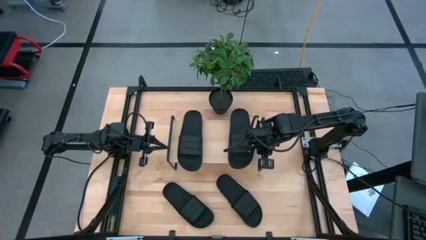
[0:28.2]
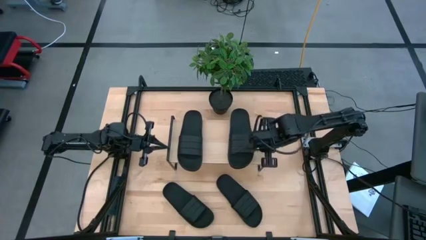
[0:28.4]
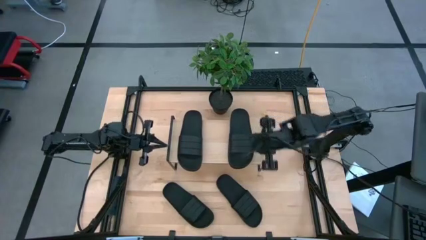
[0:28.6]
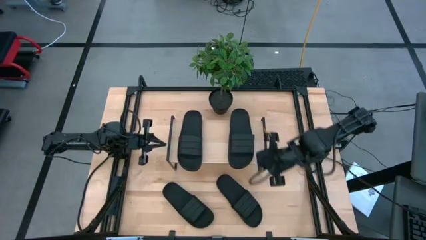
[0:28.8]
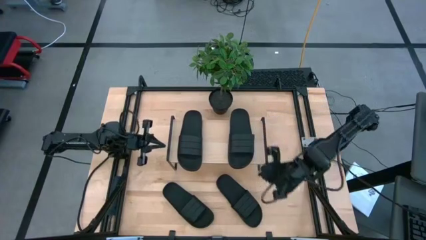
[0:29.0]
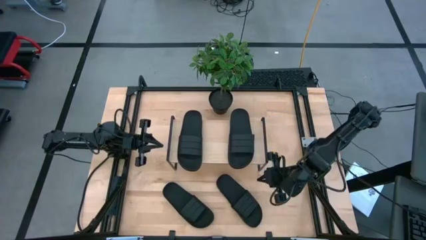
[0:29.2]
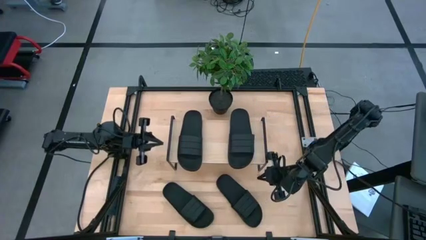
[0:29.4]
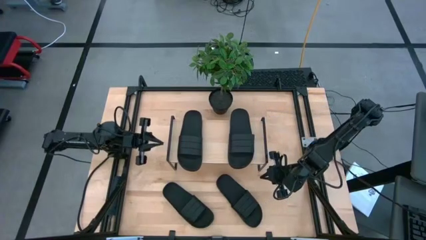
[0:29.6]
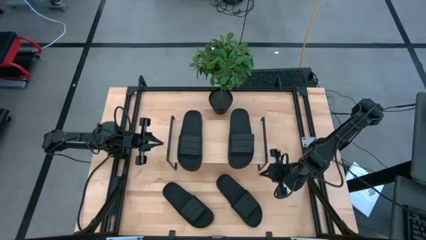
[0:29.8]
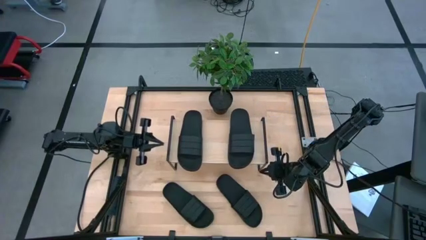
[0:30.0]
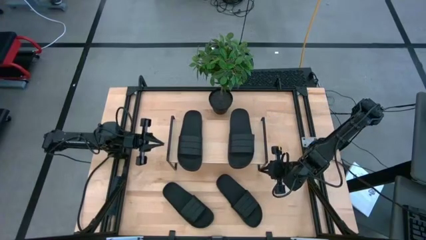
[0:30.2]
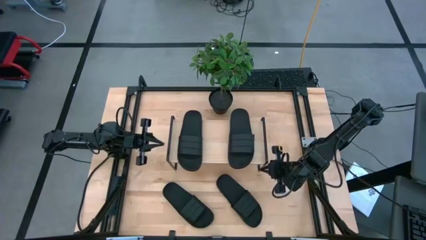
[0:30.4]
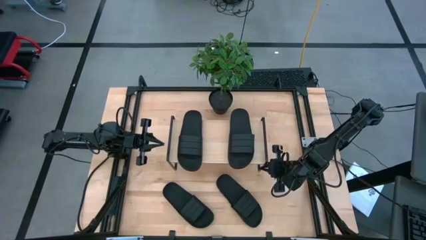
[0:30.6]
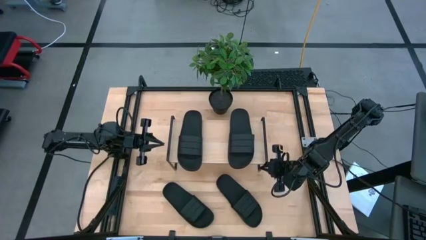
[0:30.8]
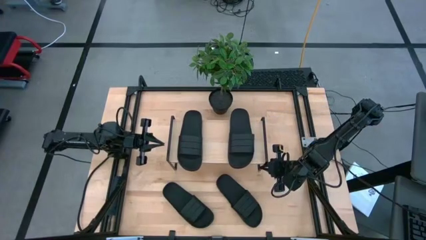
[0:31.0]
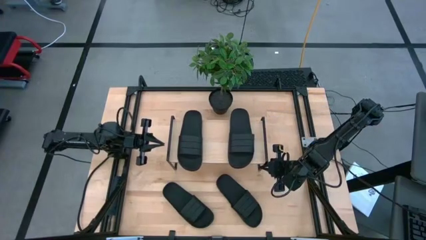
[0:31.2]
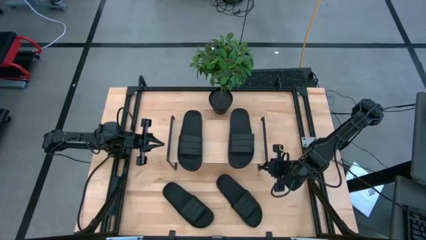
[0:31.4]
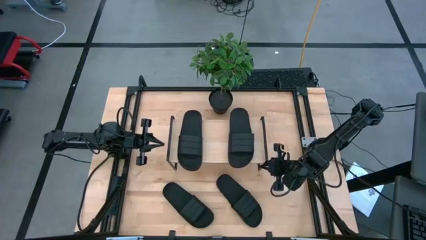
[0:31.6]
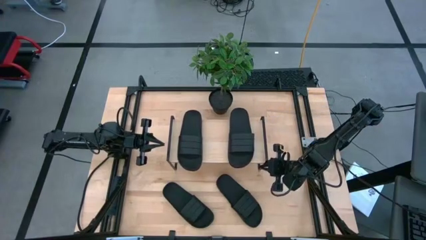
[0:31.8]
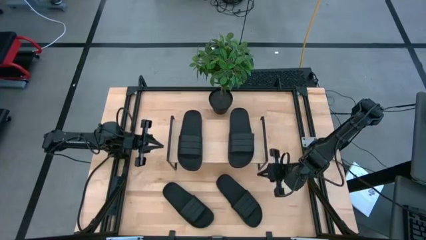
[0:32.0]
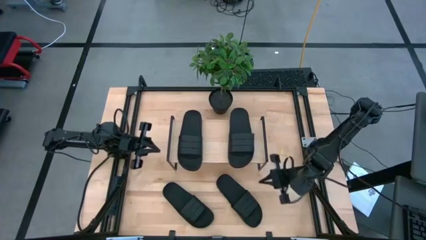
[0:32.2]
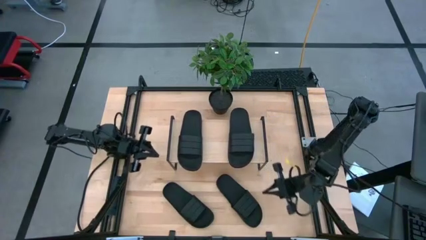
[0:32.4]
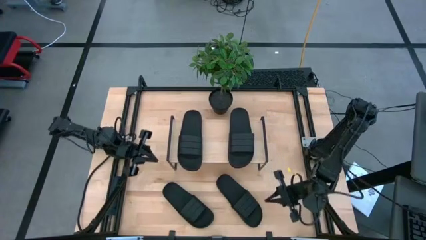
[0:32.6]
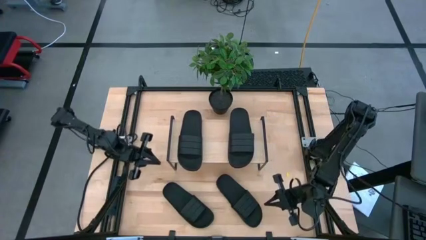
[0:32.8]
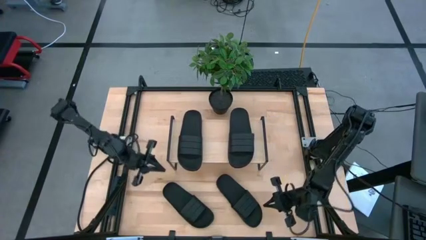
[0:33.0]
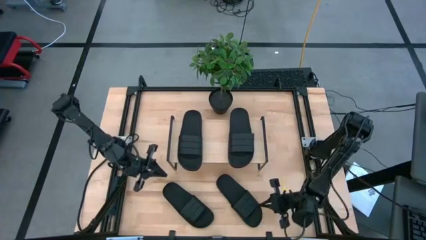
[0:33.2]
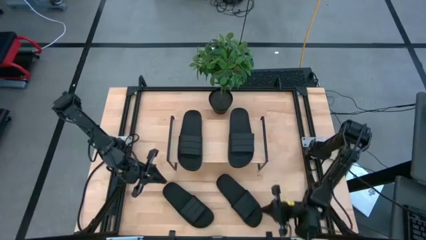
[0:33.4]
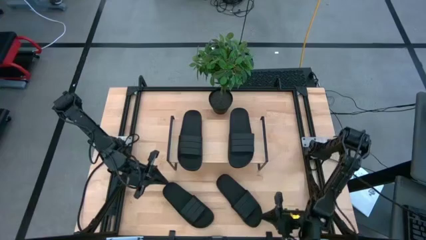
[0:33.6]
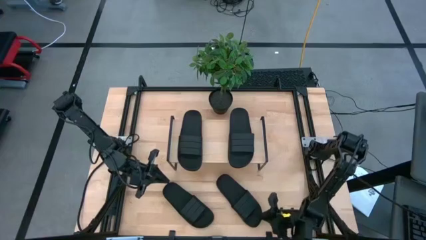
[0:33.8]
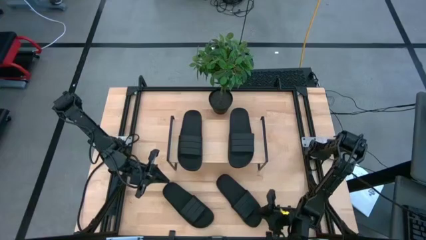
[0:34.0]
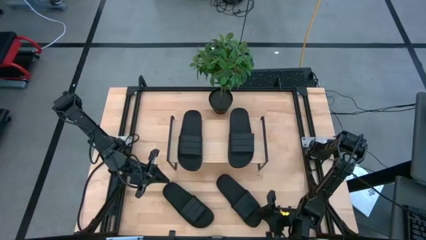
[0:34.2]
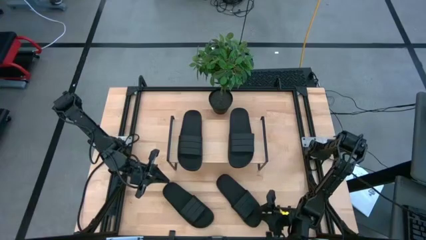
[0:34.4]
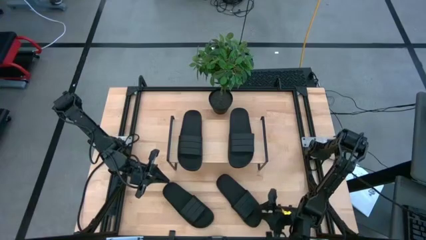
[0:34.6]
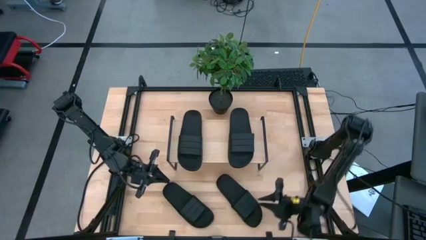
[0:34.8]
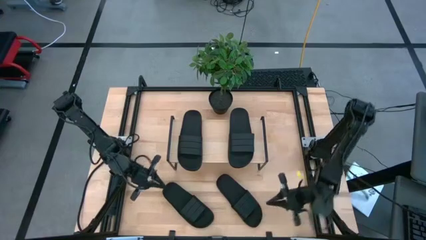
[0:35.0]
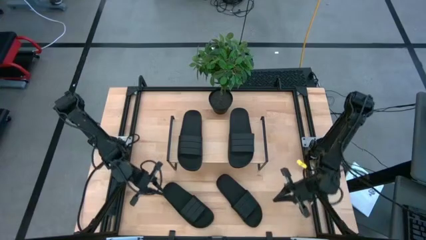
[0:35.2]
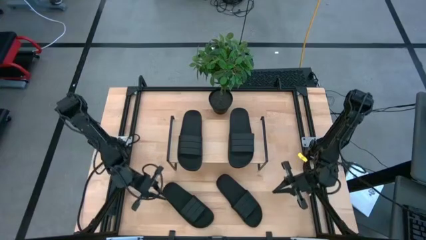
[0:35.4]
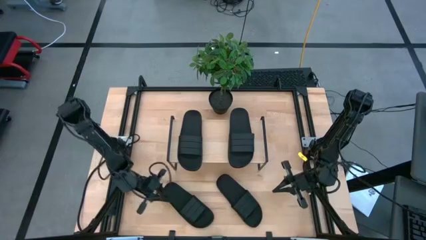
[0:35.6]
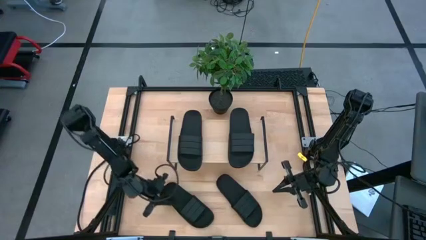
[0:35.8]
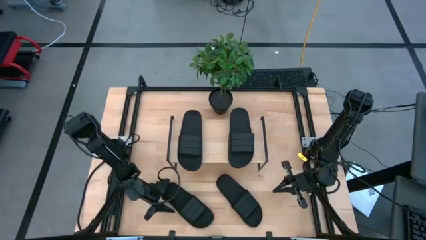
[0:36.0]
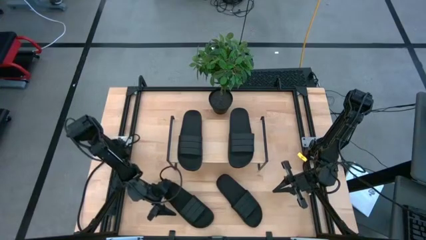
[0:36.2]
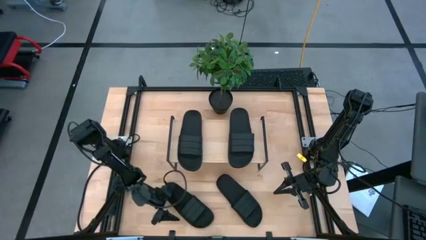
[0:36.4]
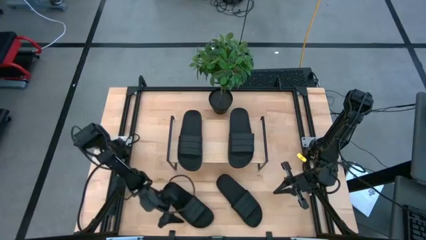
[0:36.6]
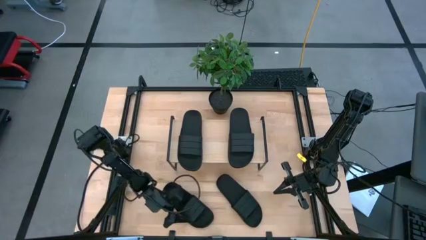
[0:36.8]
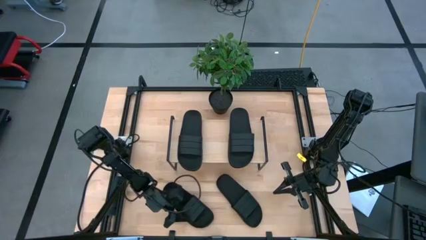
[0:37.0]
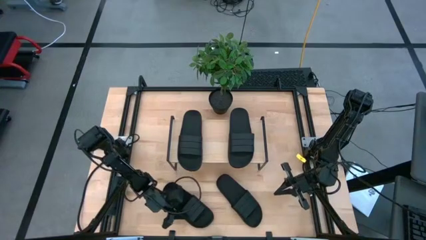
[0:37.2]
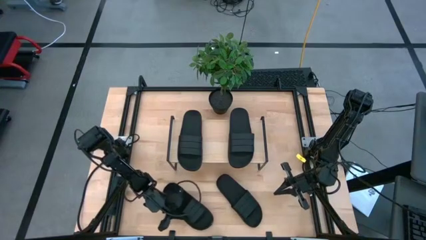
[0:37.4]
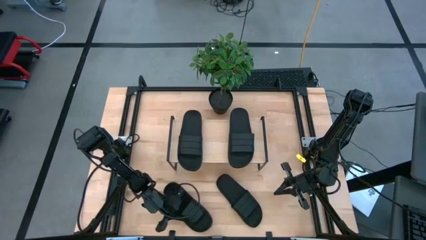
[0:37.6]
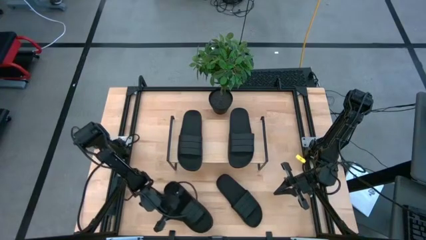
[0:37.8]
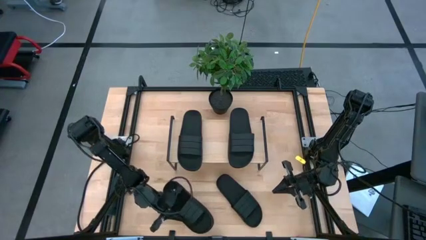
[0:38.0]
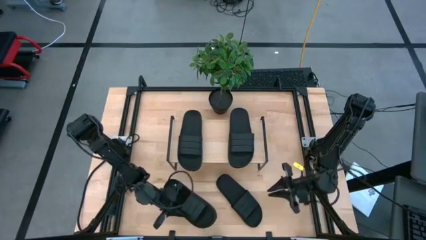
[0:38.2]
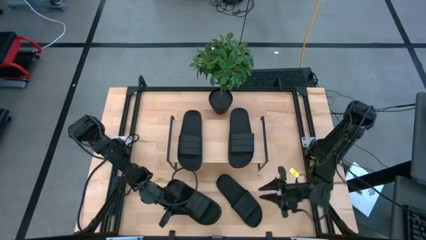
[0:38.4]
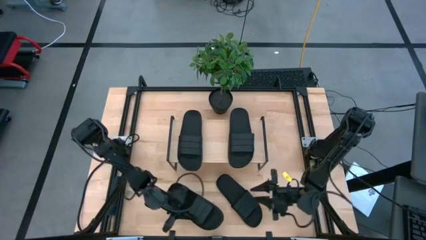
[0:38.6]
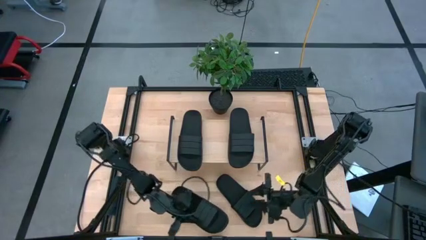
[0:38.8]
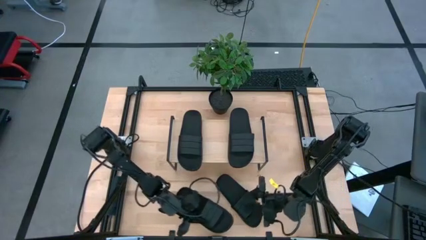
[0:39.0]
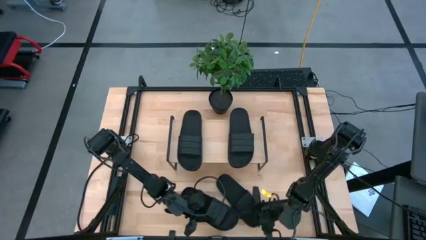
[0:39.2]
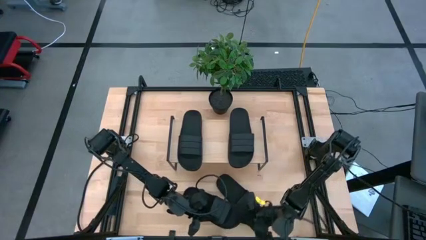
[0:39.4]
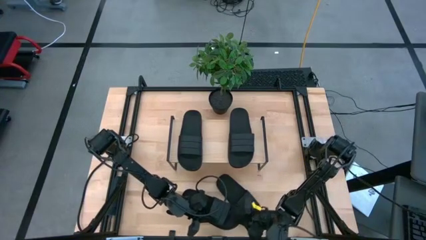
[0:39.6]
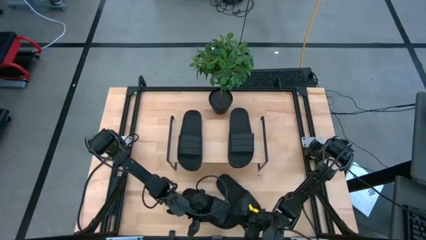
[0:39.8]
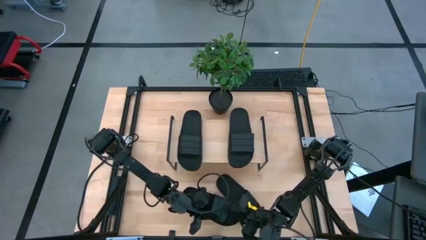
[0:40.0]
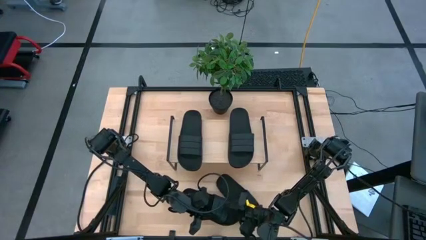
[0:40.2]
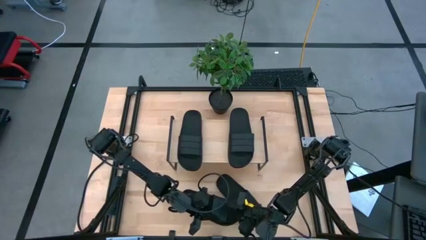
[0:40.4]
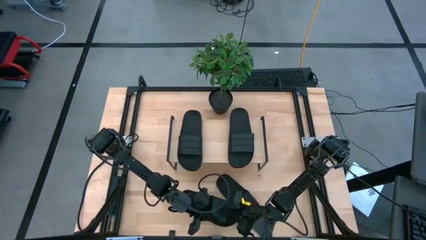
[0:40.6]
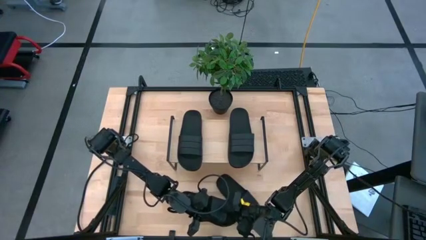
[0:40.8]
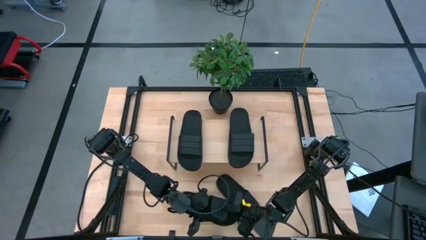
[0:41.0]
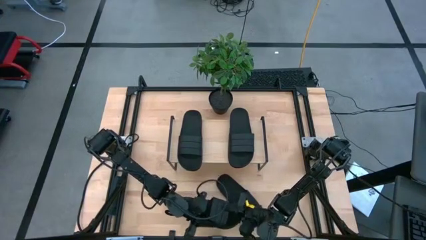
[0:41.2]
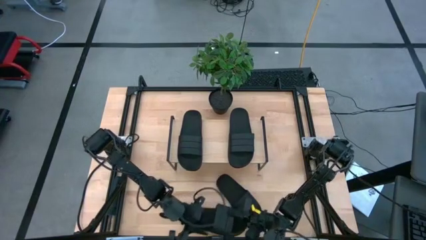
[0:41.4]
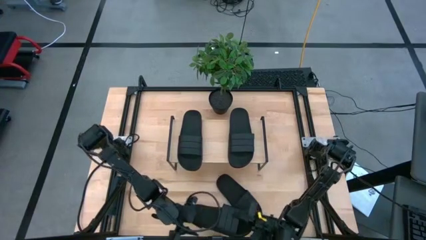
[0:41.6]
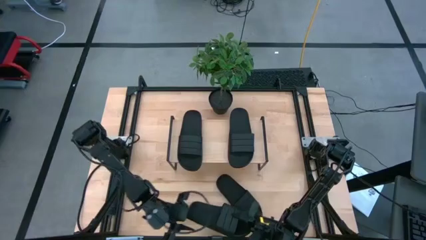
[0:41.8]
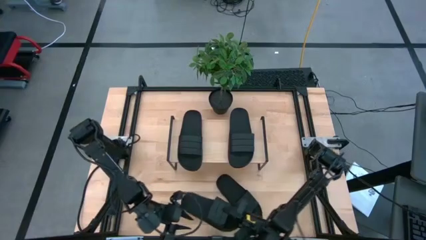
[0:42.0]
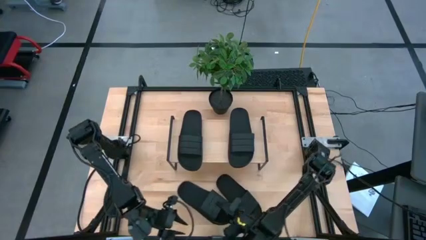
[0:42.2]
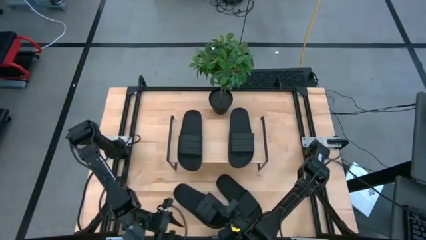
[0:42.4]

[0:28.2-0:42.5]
Task: Pick and place slides into the shelf
Put the left black slide under the shelf
